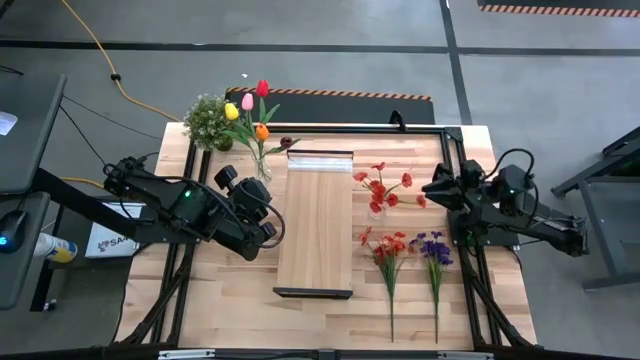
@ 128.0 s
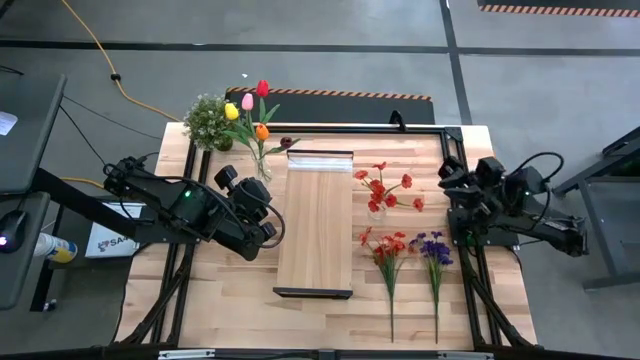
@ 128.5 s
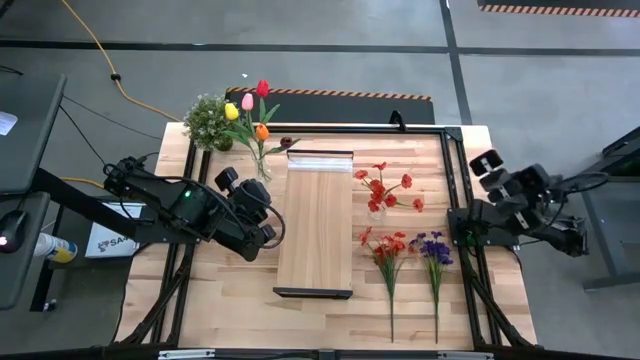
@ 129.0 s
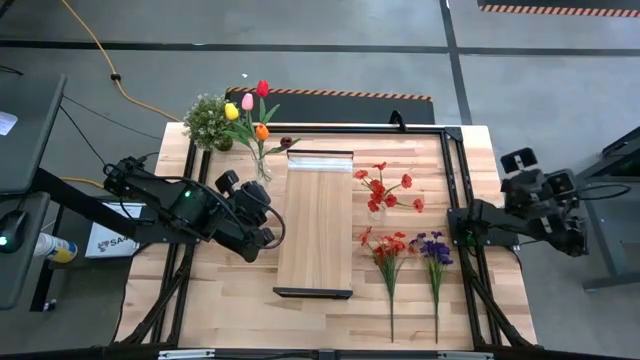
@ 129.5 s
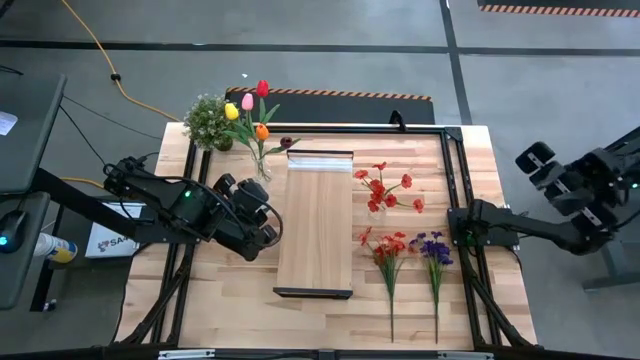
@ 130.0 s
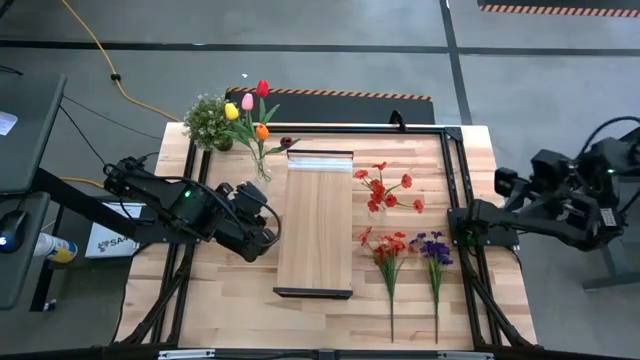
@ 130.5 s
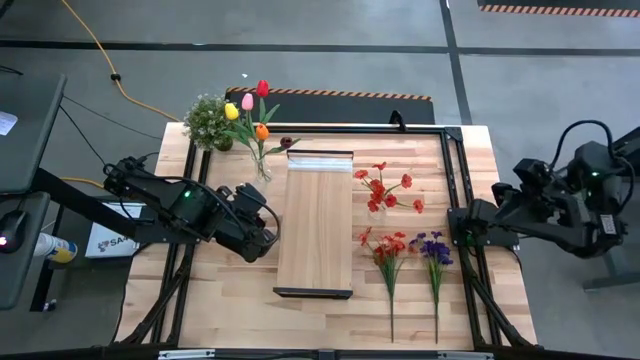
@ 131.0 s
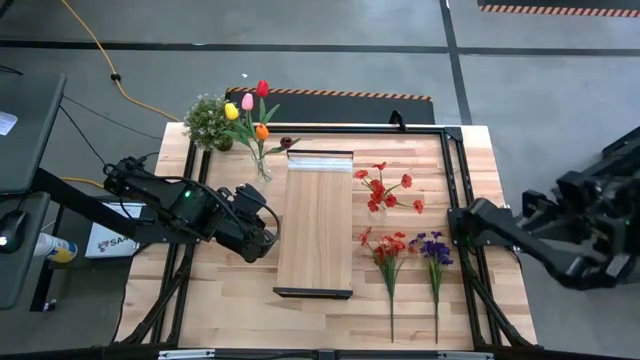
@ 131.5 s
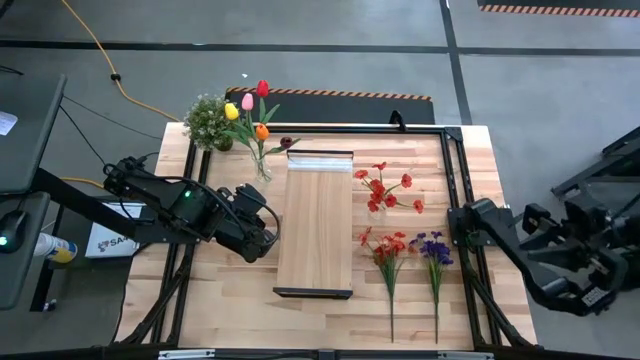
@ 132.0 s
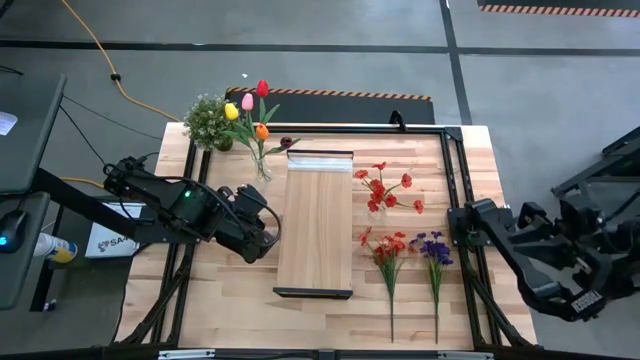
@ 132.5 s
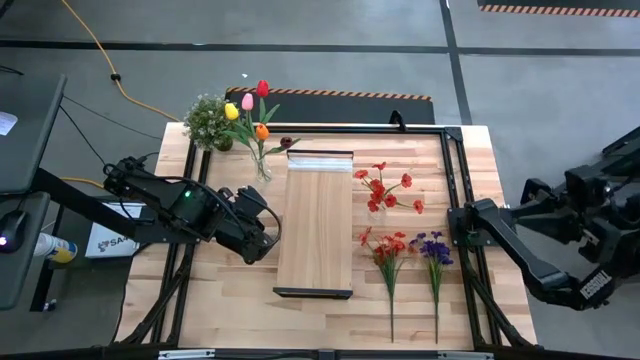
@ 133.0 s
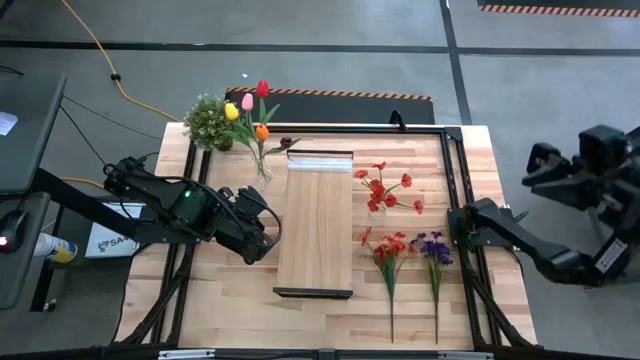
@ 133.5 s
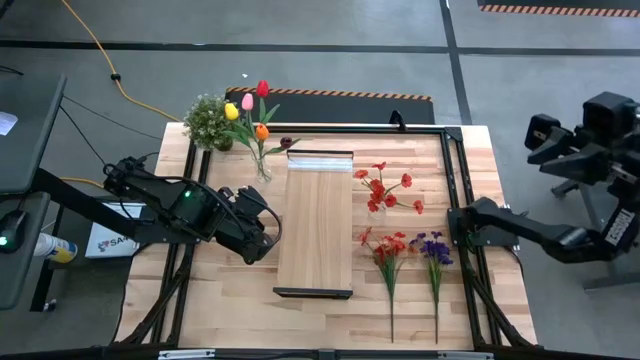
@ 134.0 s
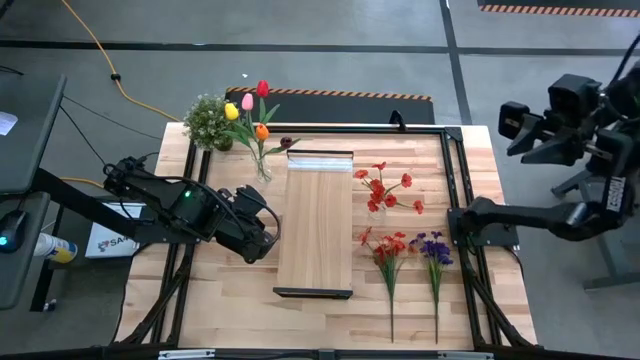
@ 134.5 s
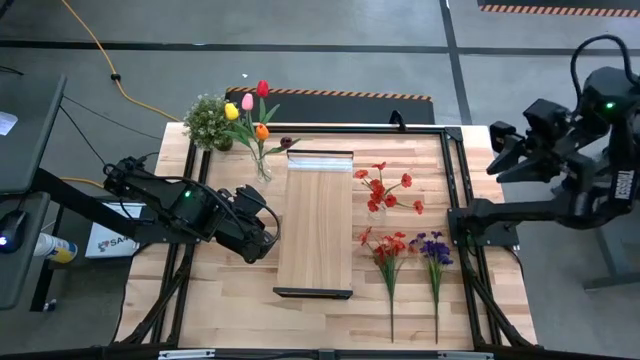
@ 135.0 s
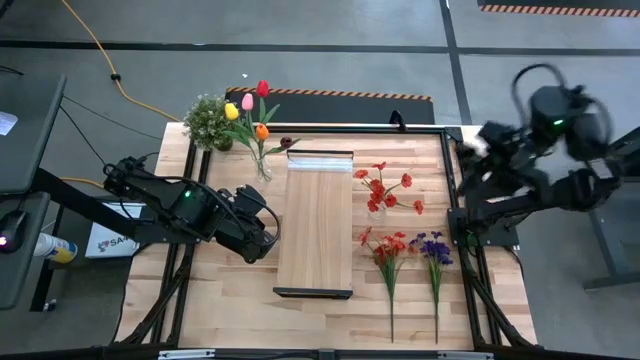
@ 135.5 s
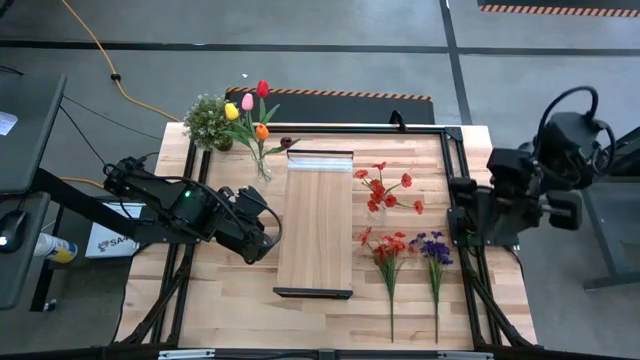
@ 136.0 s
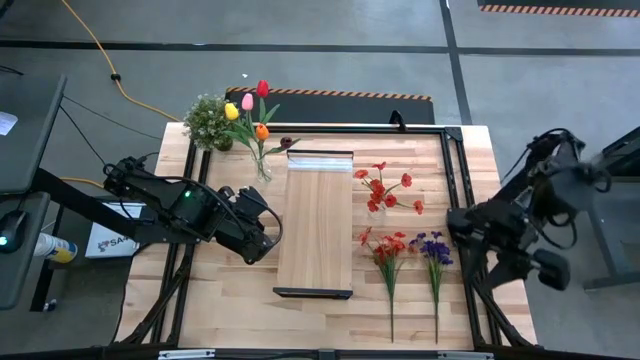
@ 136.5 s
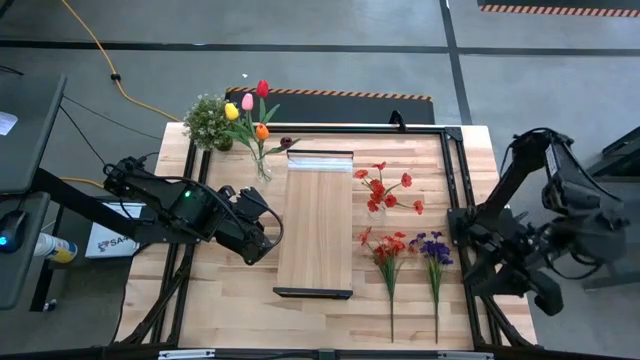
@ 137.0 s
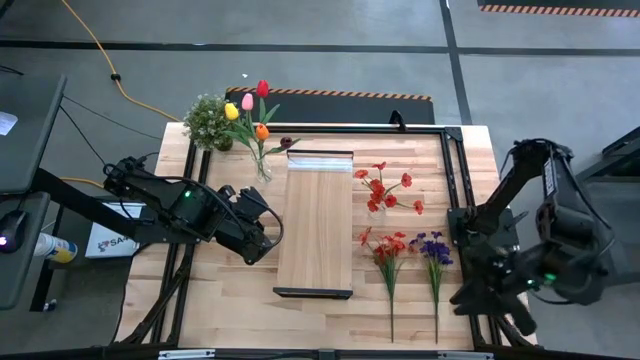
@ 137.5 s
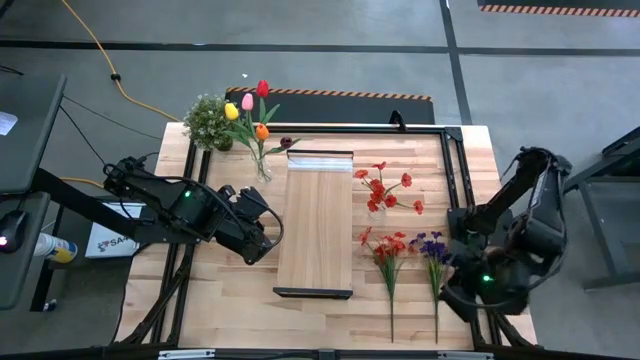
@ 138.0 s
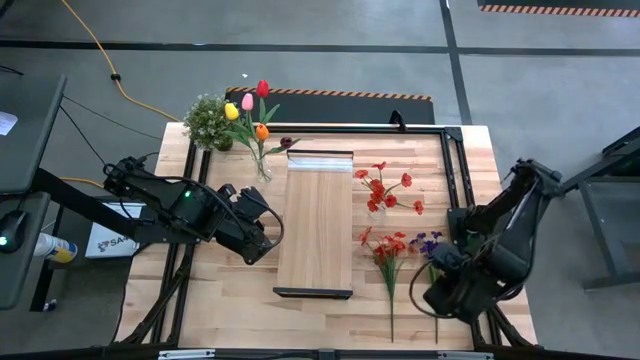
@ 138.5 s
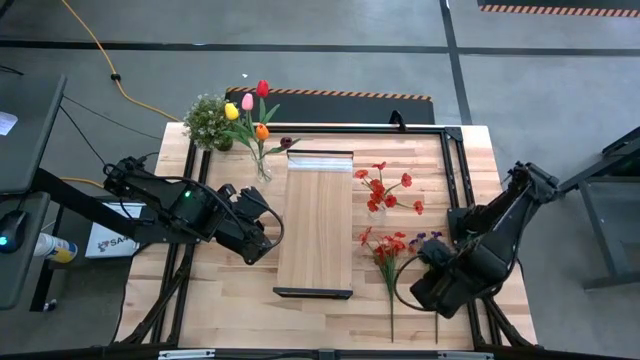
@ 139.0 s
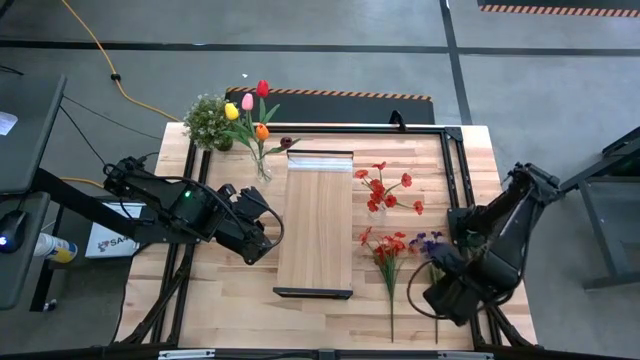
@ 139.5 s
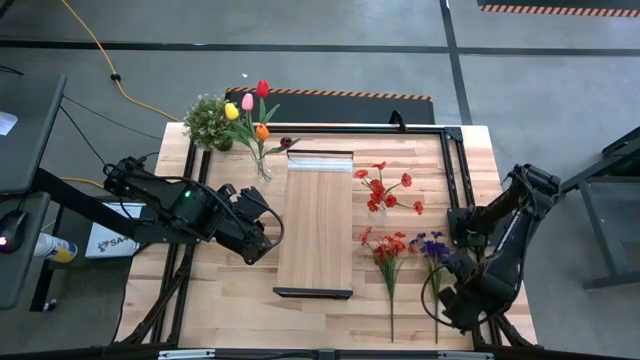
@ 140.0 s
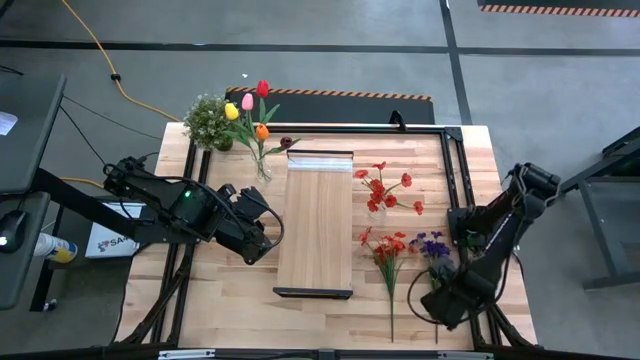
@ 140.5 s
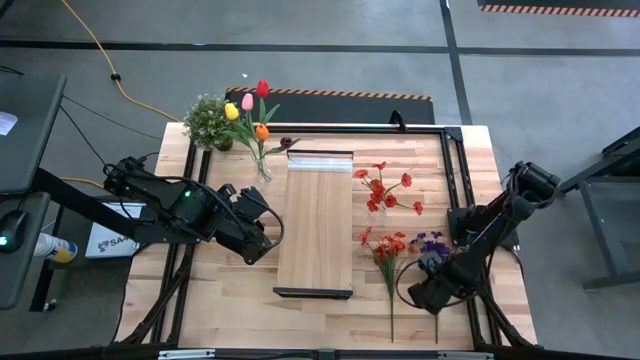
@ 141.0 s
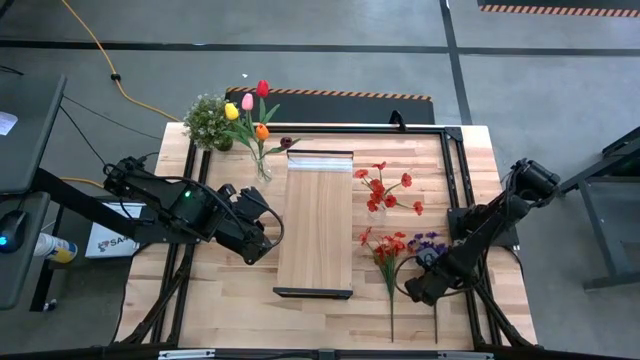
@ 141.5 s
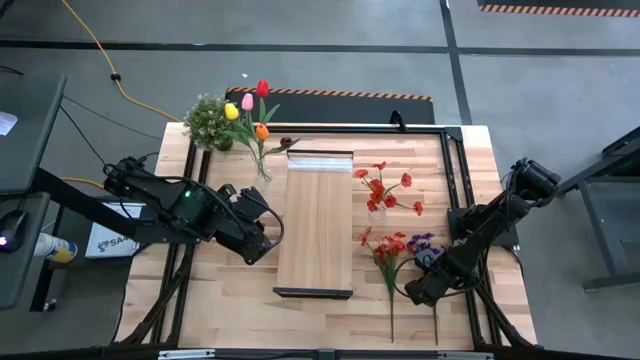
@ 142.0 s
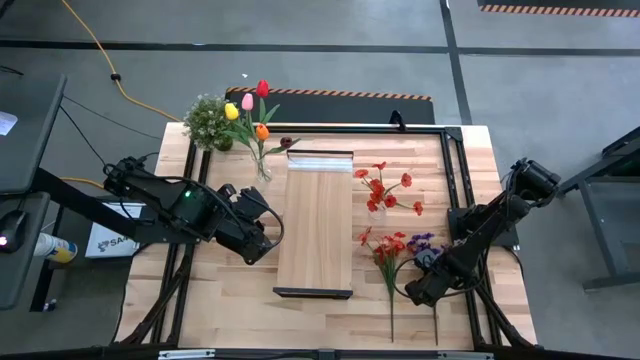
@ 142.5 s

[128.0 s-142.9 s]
Task: Pick and place flowers into a vace then onto a shelf
Put the purple flowers into the right vase

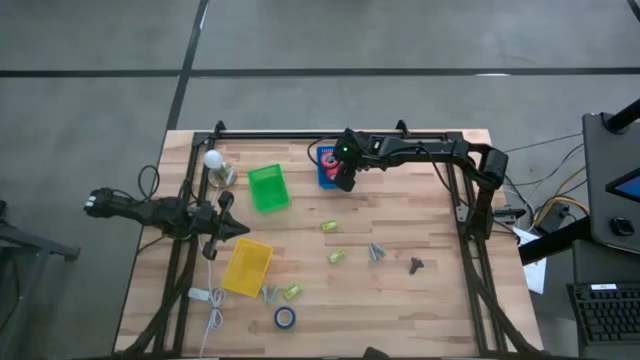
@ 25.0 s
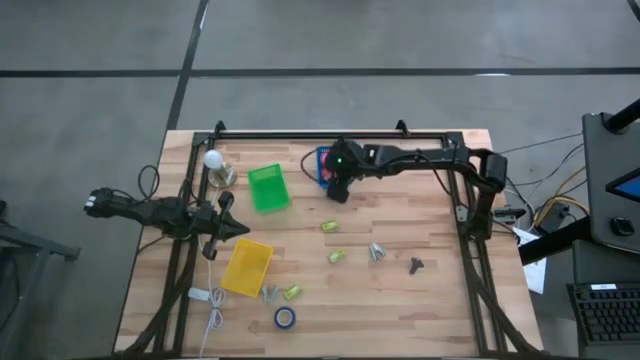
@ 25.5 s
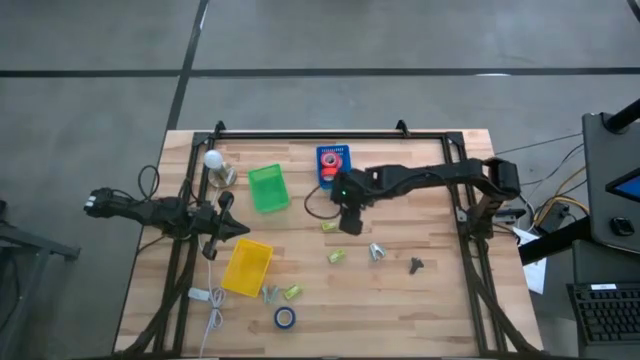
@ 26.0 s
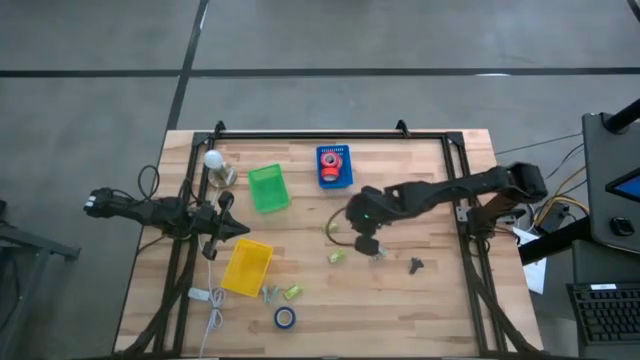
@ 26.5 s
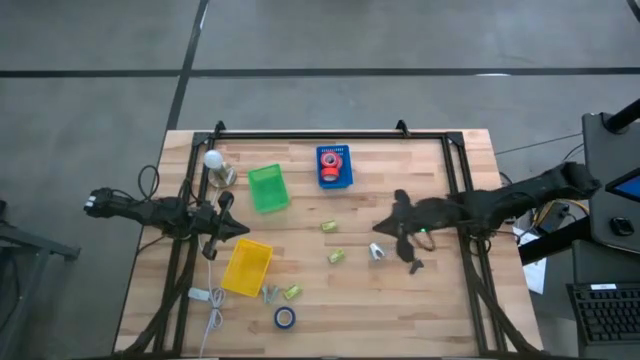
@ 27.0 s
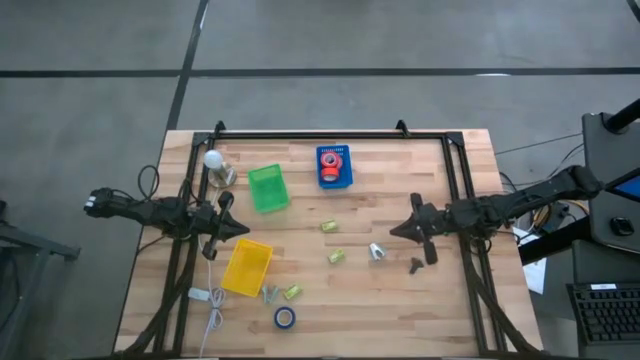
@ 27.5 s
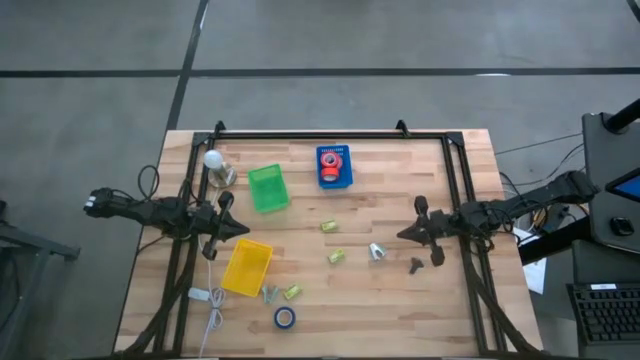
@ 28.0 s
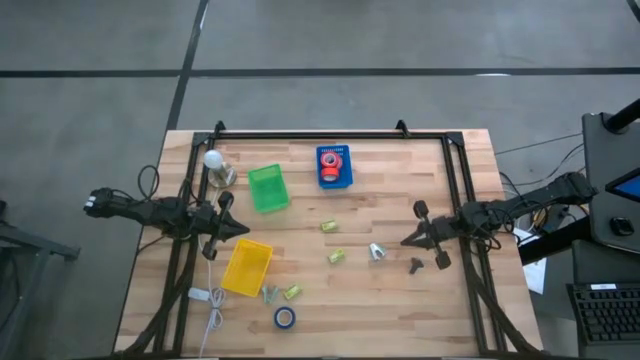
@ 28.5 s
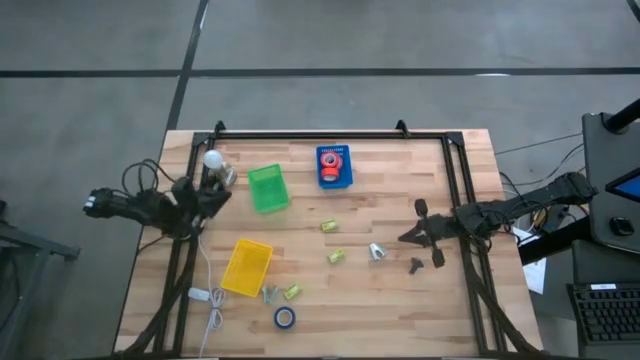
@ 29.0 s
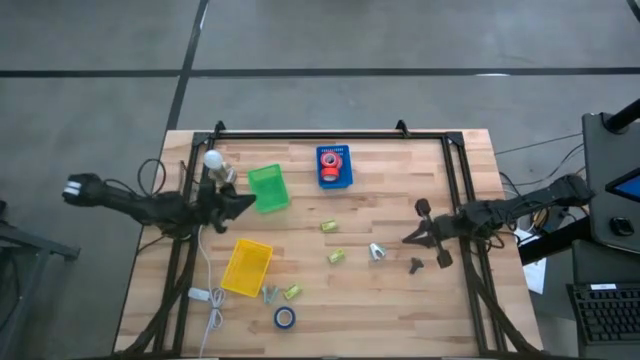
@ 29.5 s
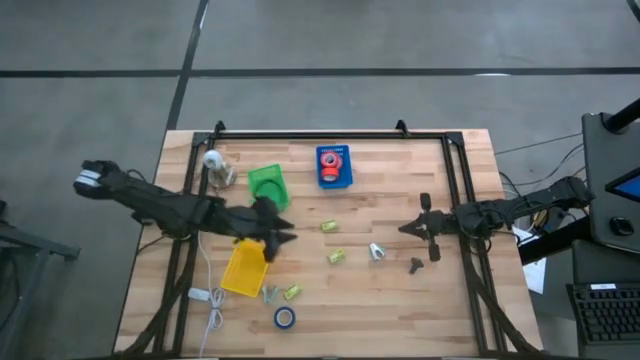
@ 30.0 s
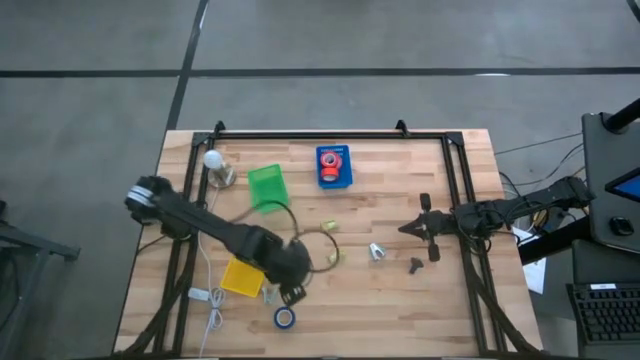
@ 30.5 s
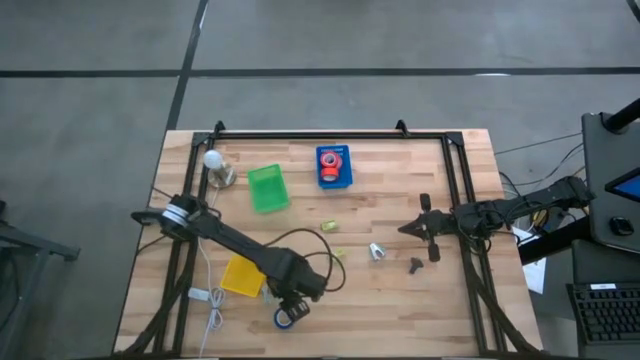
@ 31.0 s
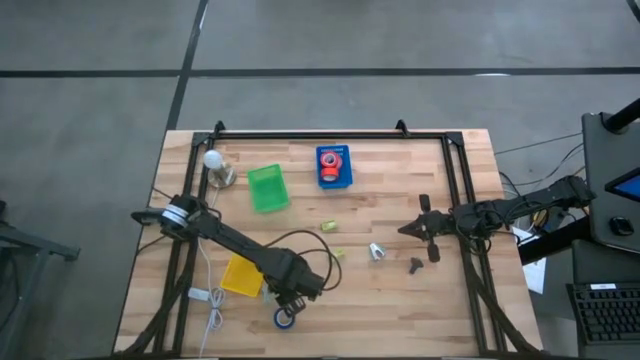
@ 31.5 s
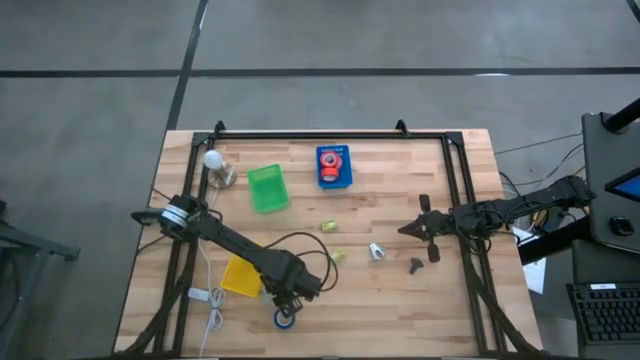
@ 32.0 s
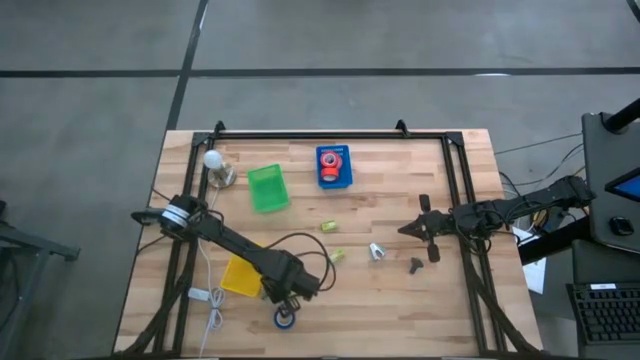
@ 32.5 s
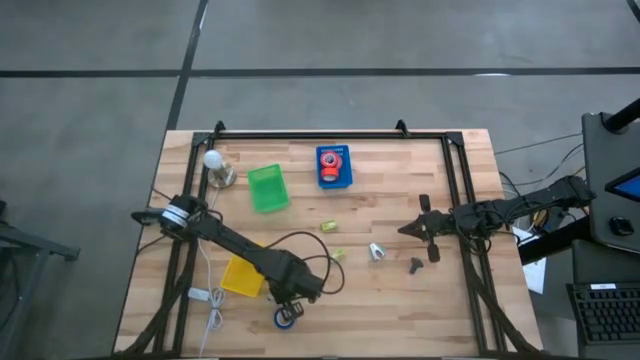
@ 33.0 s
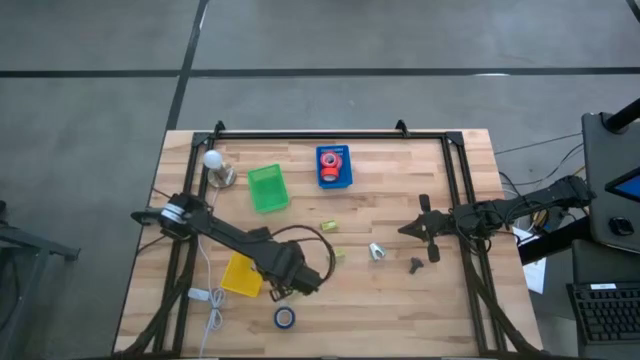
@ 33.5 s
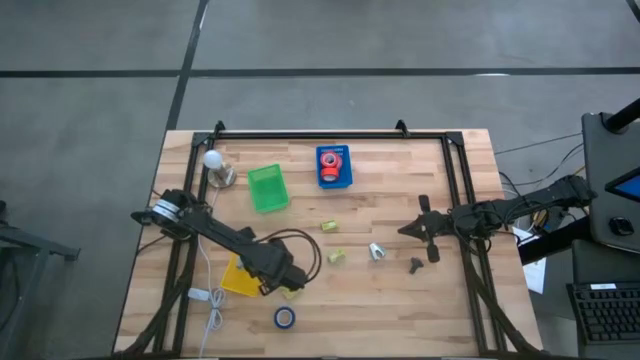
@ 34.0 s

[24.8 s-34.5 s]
Task: Pick and place Stapler, Stapler remover, tape
Put the bottom blue staple remover into the yellow bin
